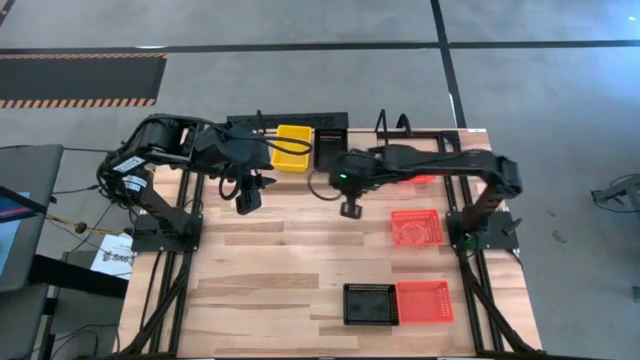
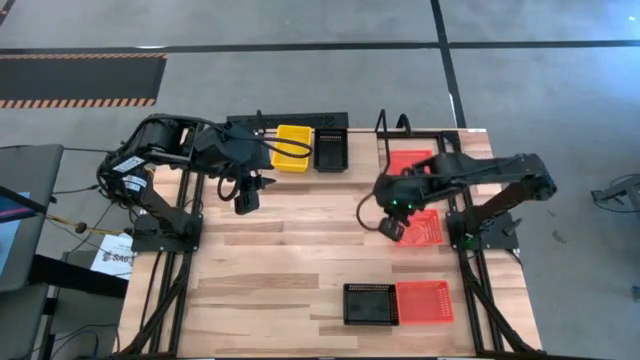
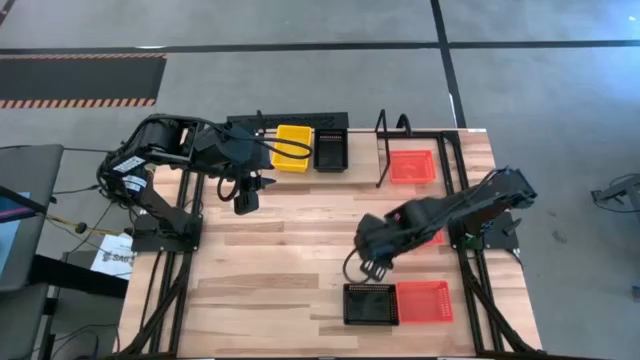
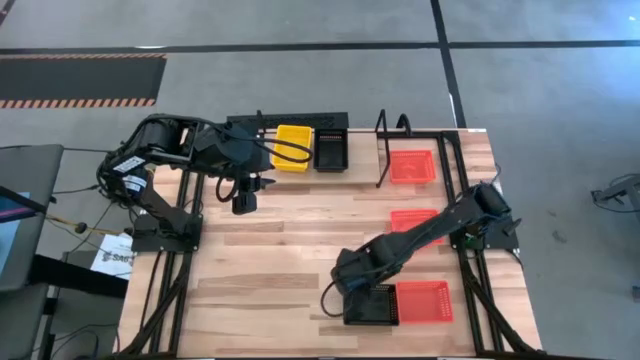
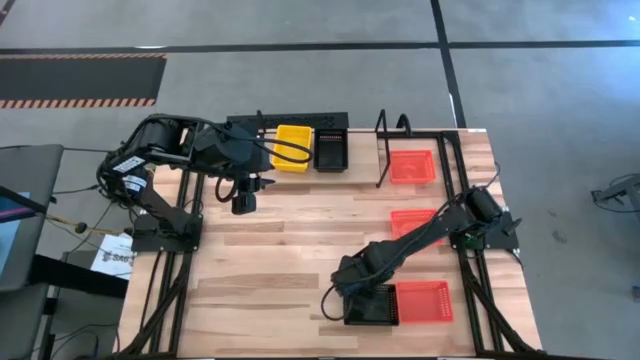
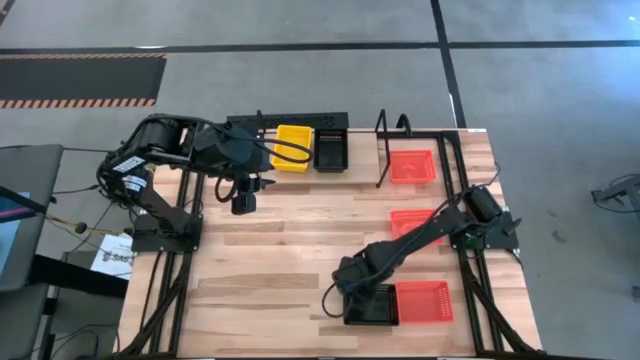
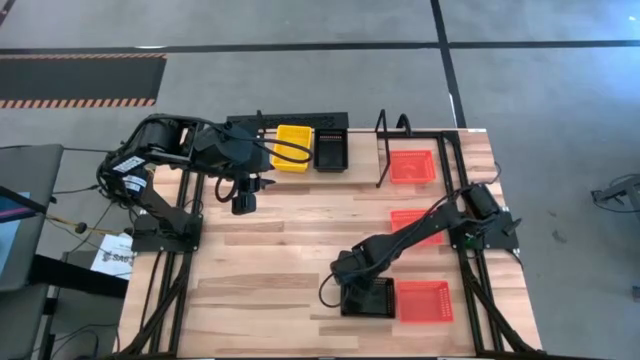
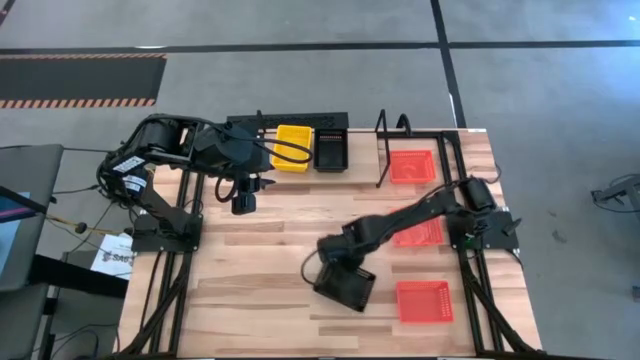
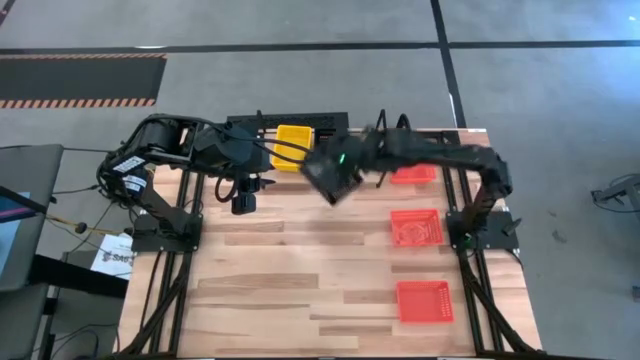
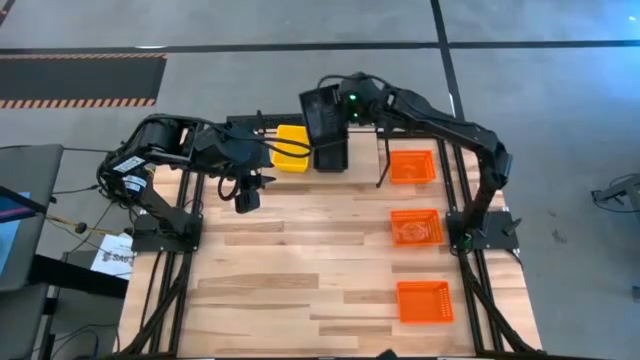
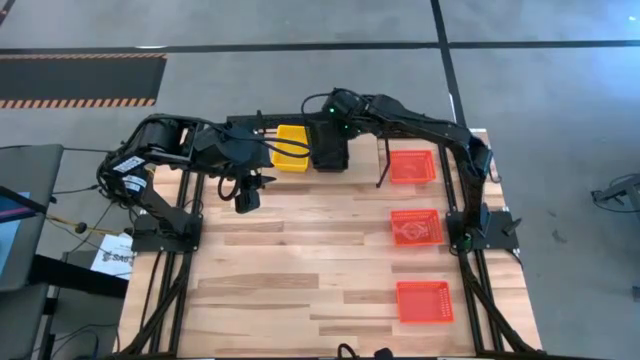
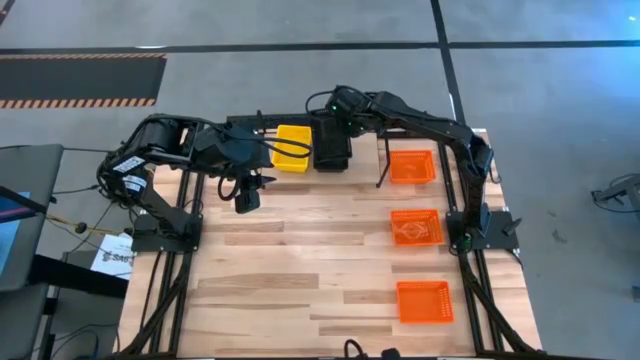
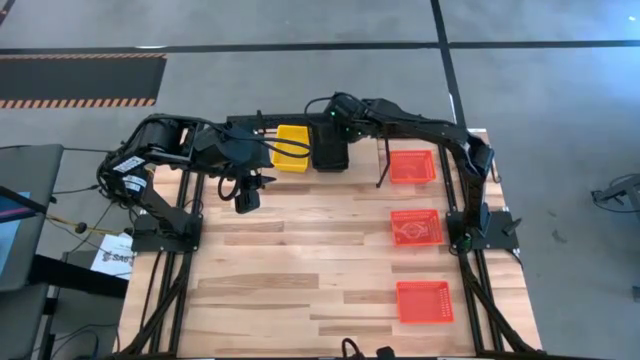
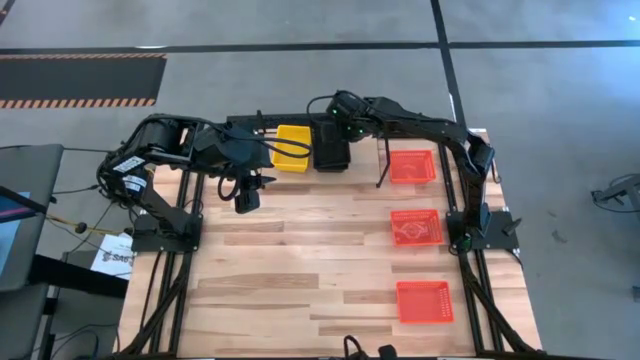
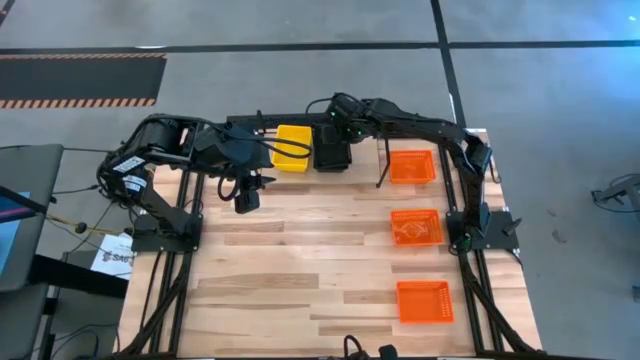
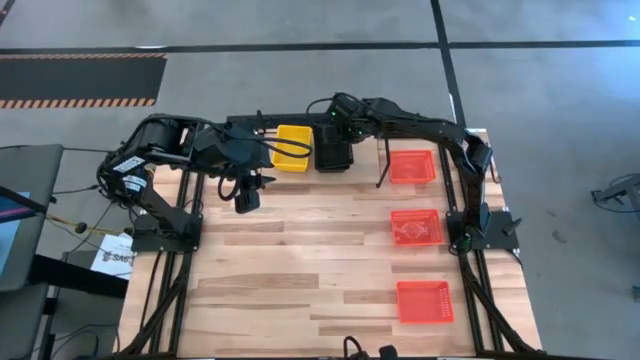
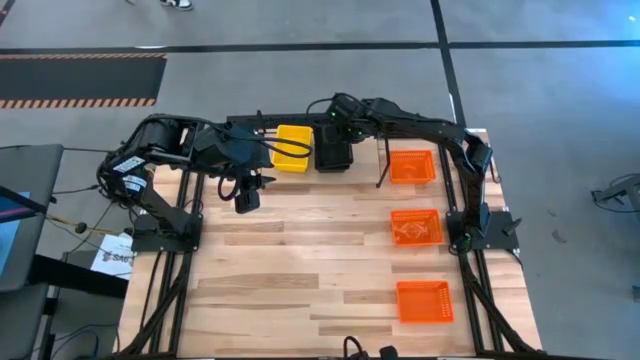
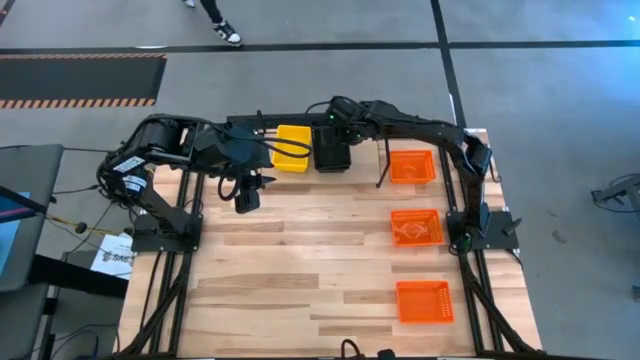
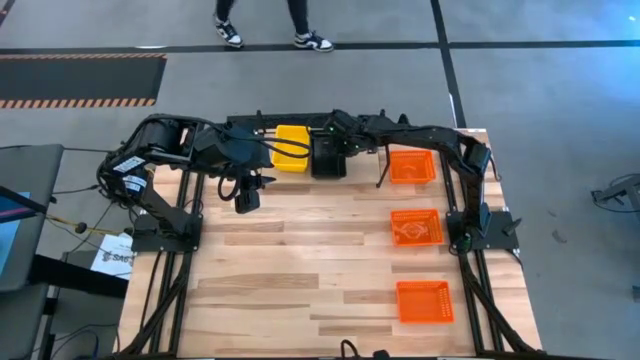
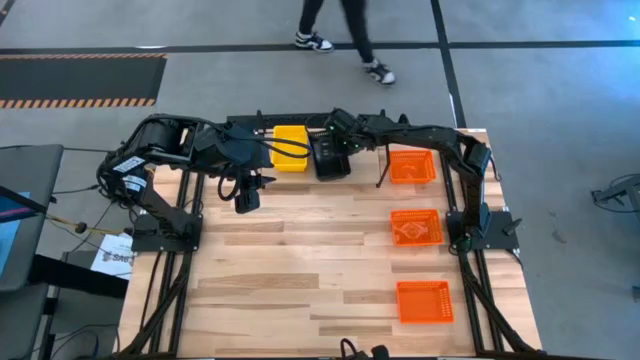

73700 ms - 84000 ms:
Task: Stack baskets on shelf by color
Stack the black bin on top of the other black bin on the shelf

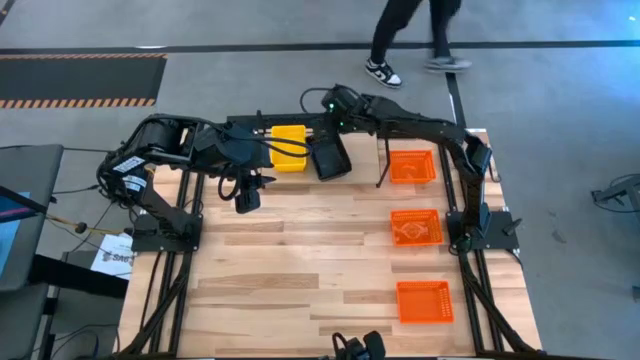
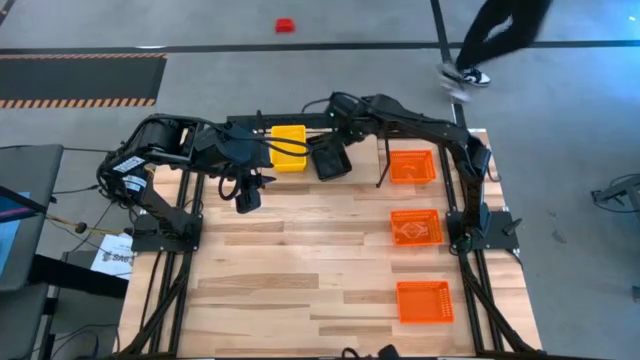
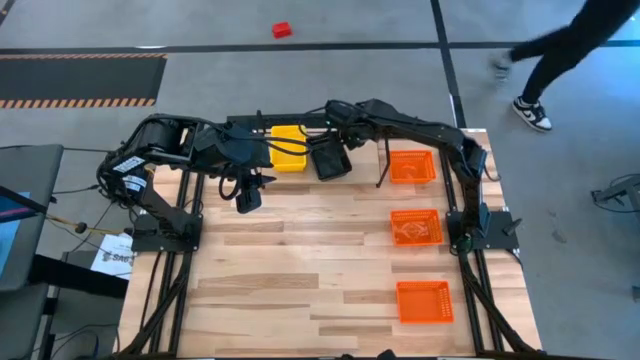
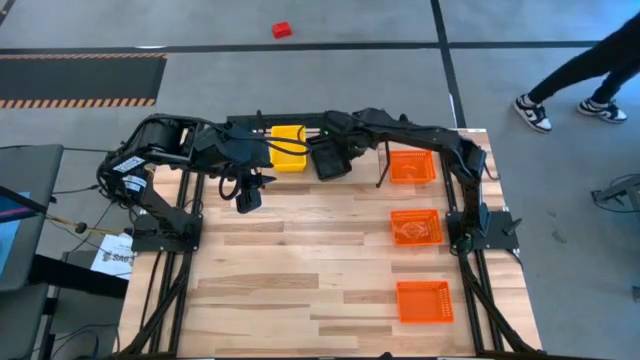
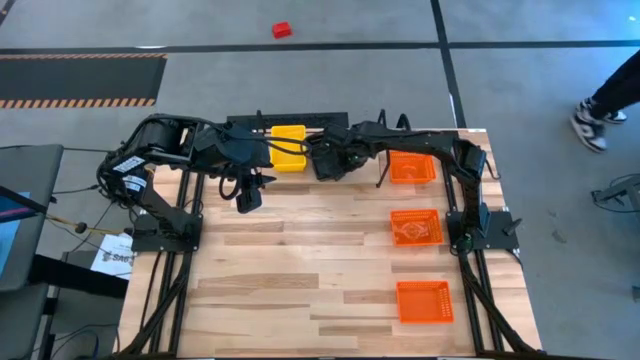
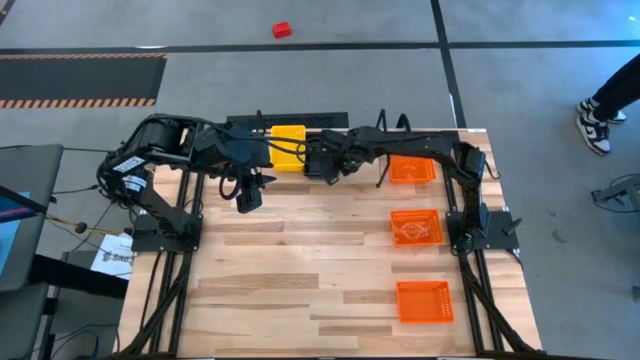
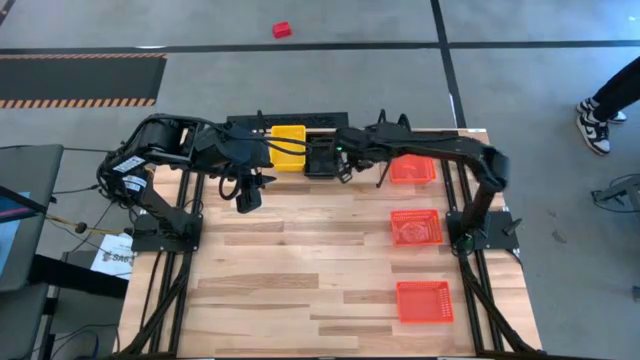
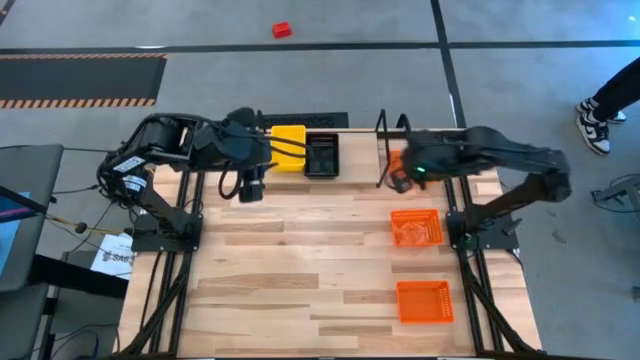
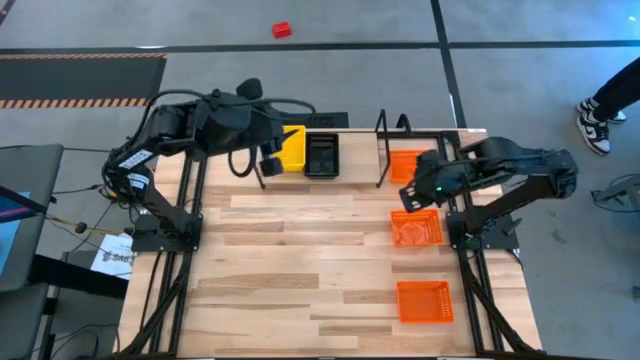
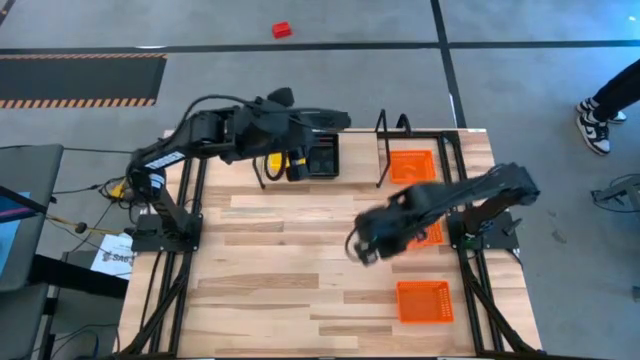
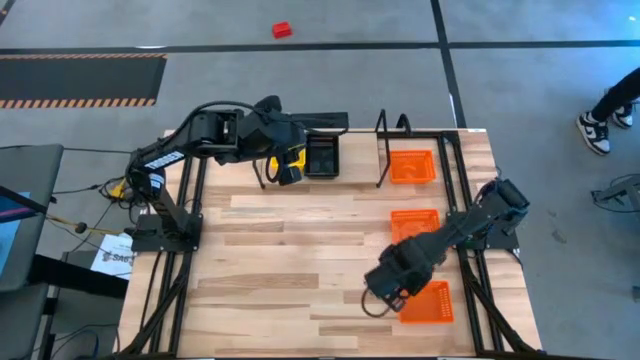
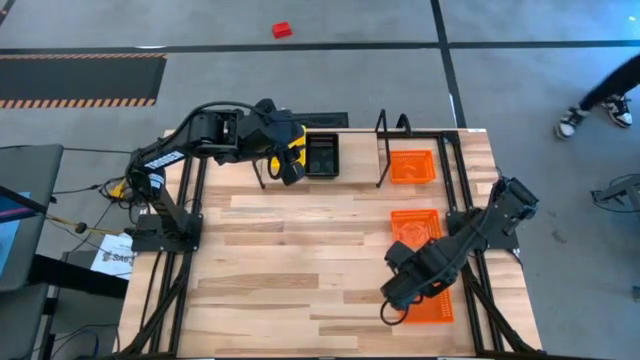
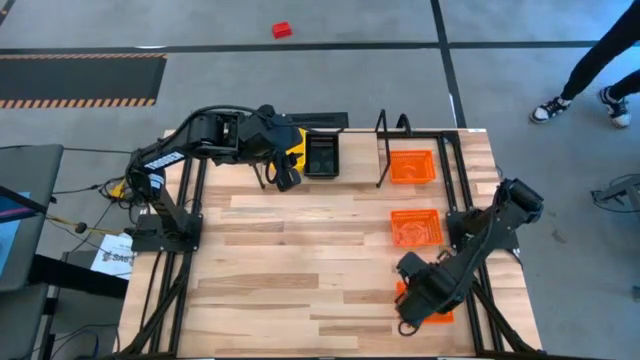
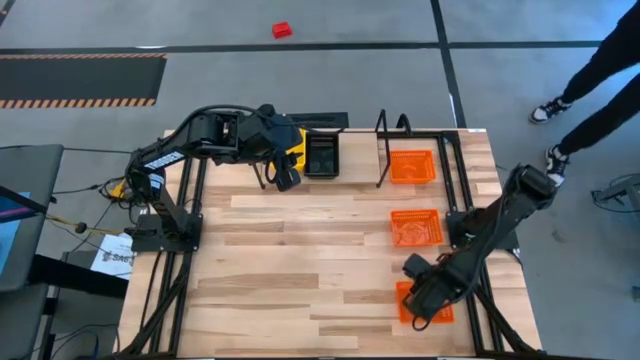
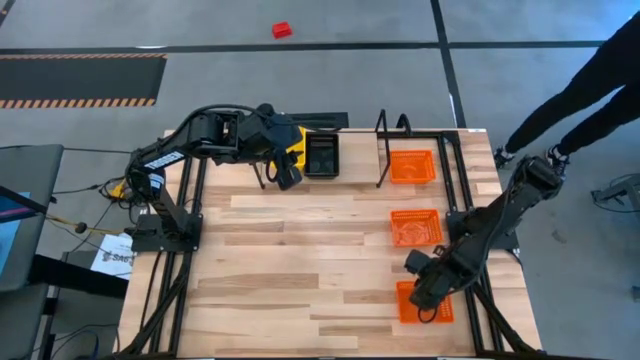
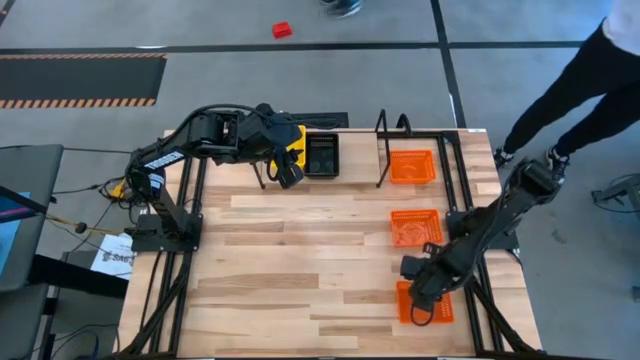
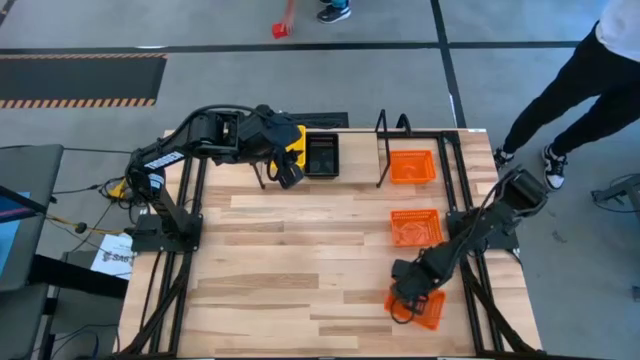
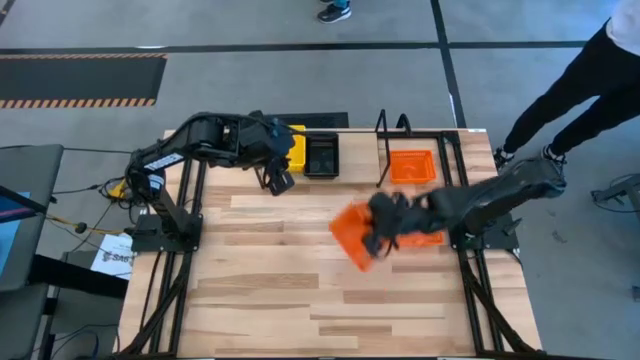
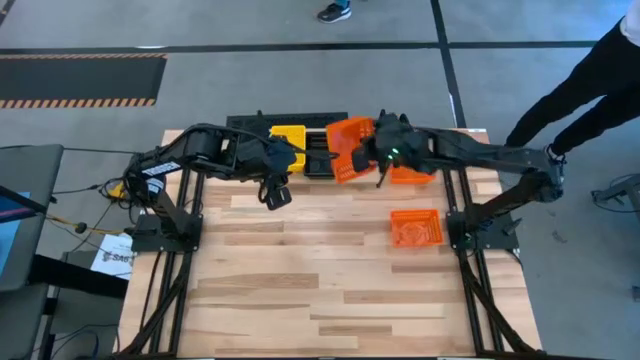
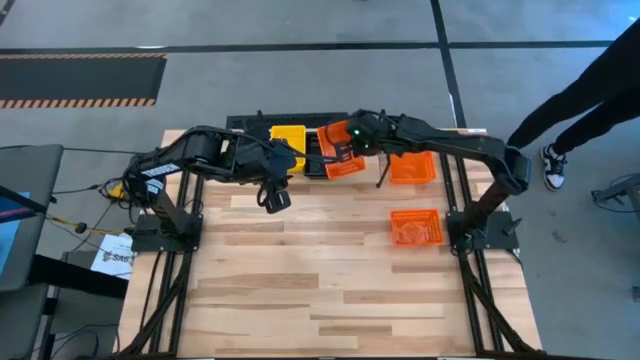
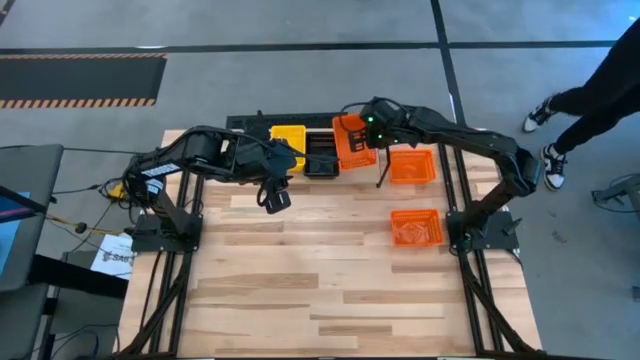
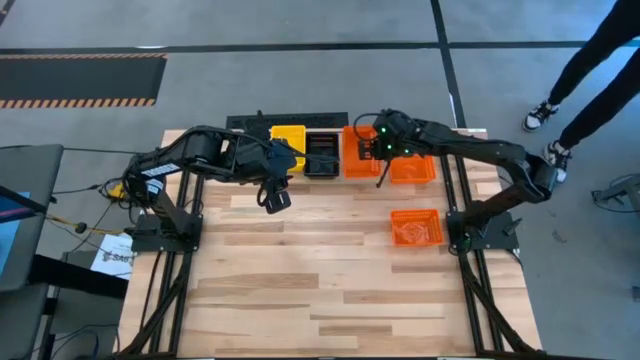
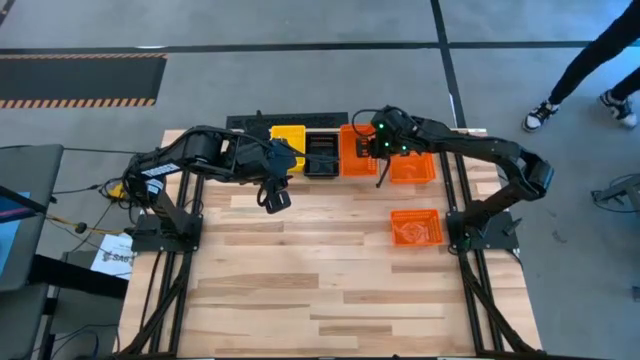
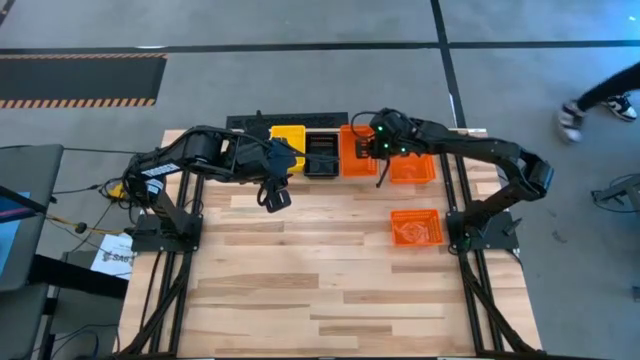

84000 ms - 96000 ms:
Put the bottom orange bin on the shelf
